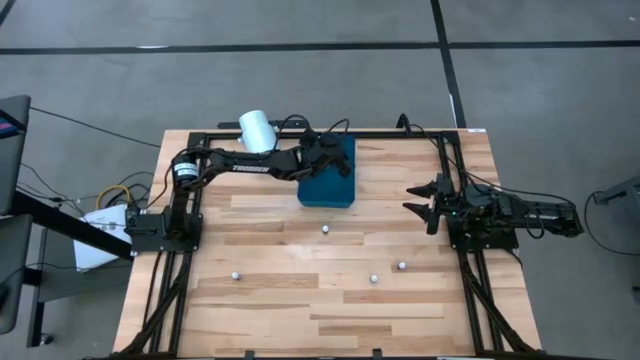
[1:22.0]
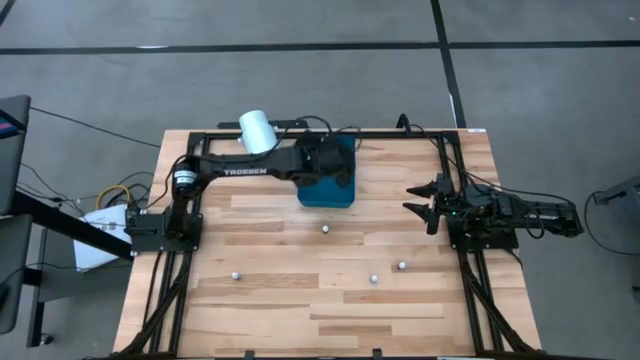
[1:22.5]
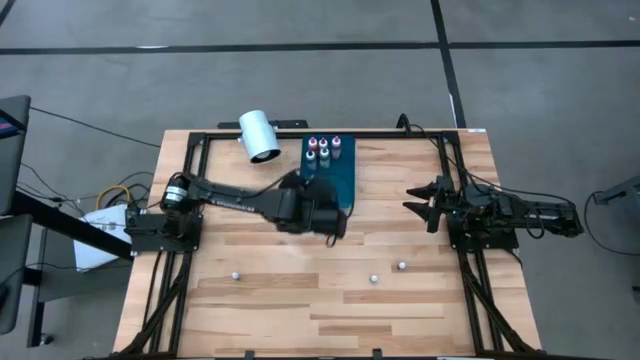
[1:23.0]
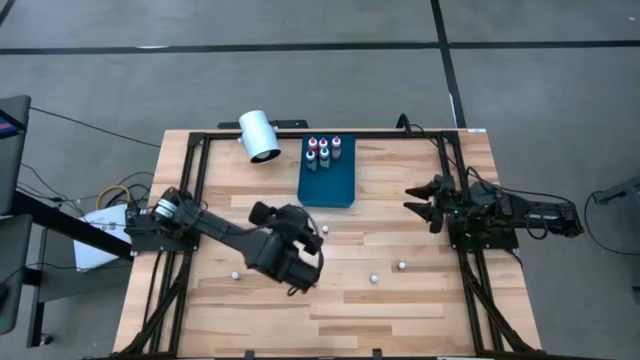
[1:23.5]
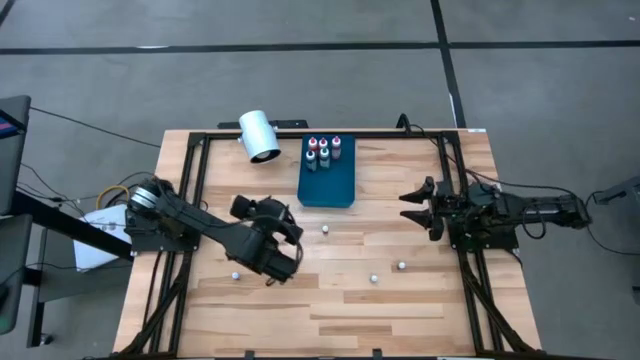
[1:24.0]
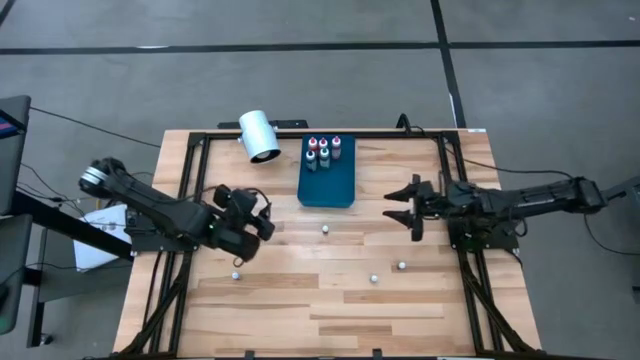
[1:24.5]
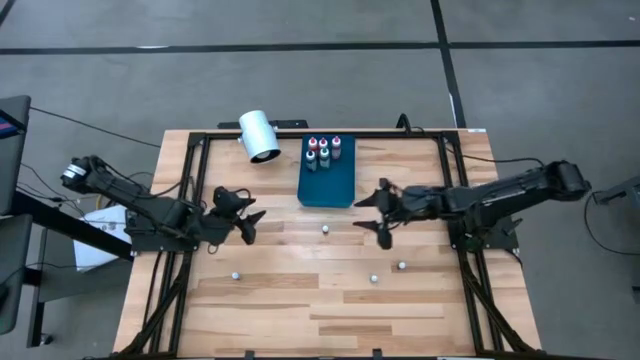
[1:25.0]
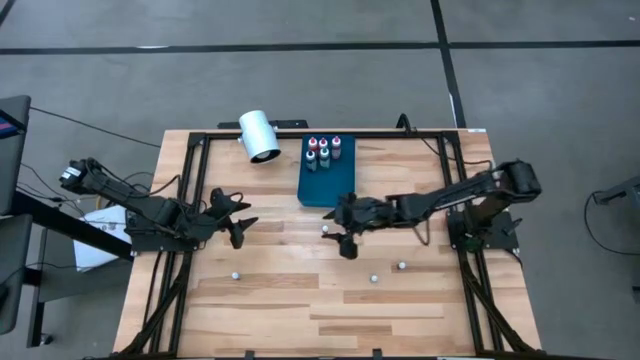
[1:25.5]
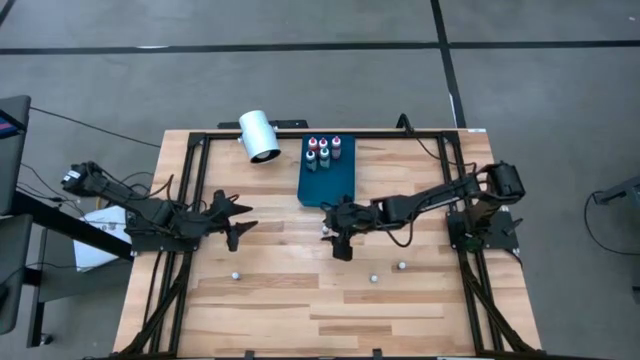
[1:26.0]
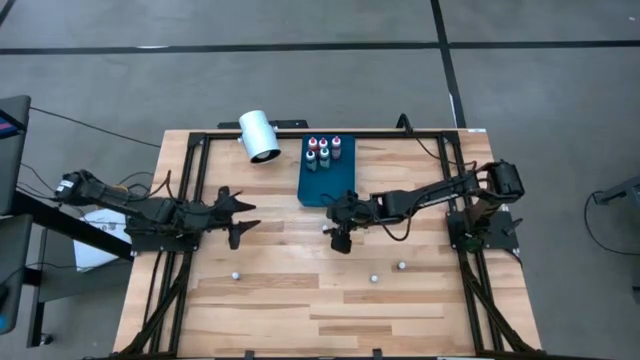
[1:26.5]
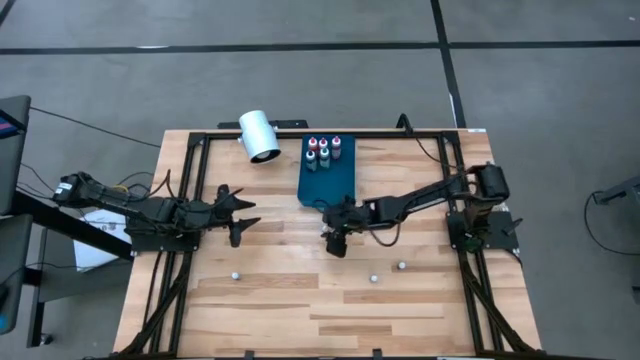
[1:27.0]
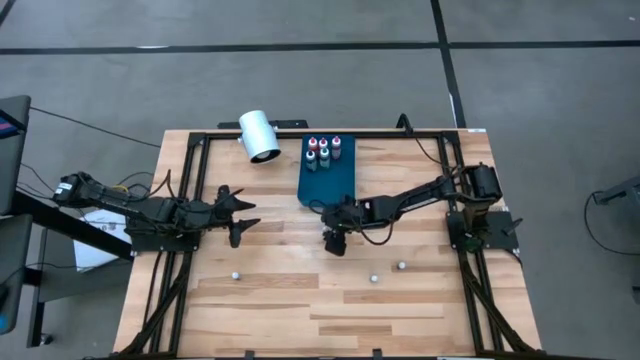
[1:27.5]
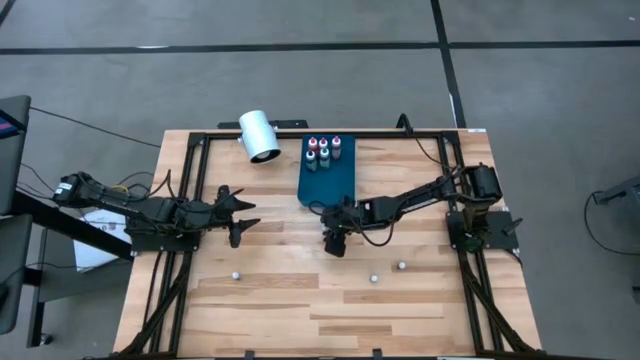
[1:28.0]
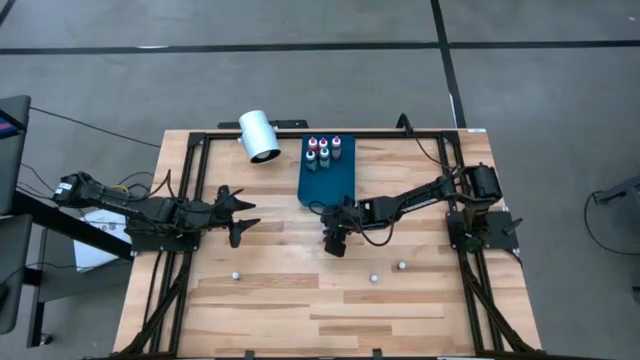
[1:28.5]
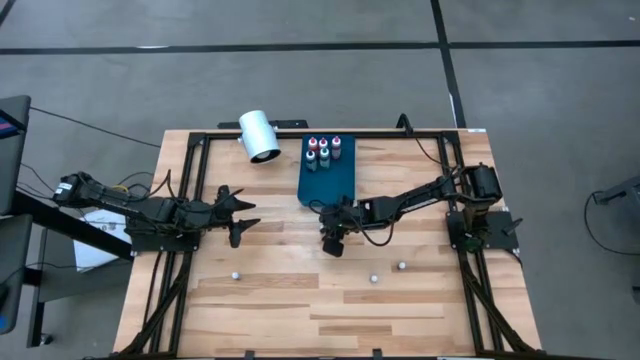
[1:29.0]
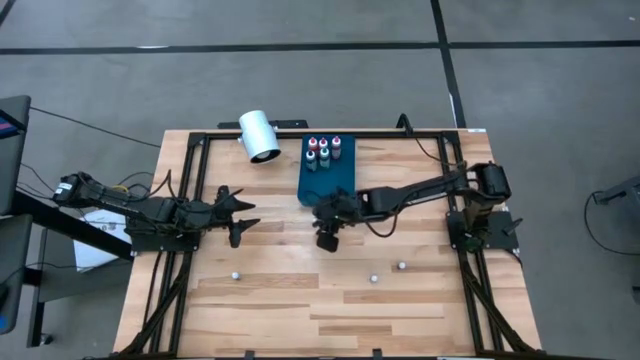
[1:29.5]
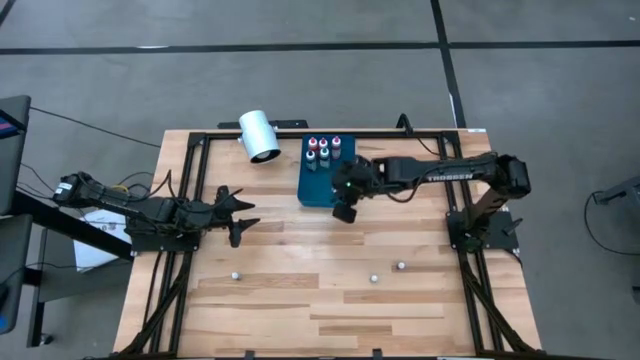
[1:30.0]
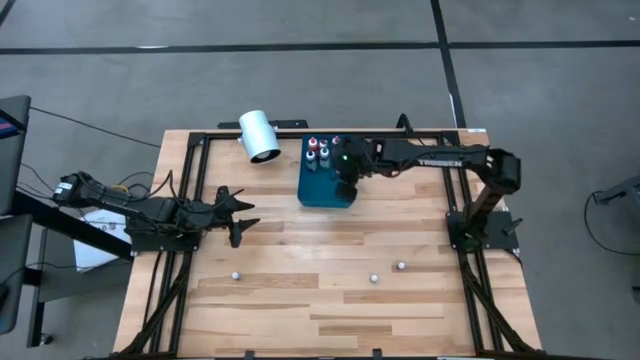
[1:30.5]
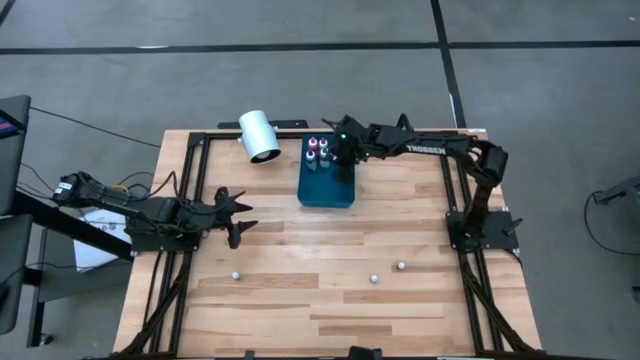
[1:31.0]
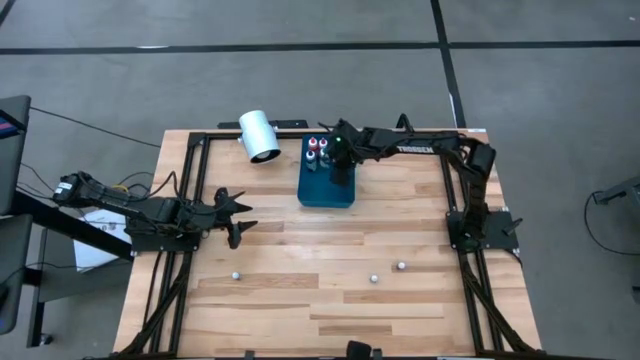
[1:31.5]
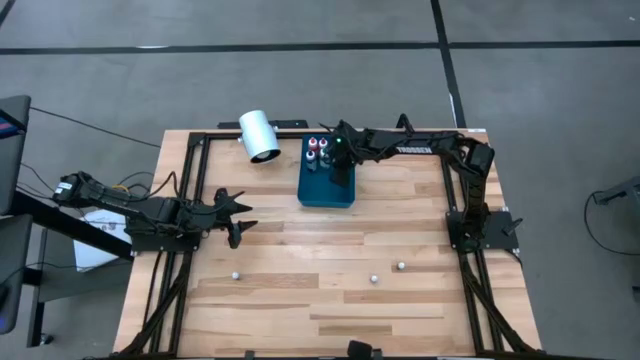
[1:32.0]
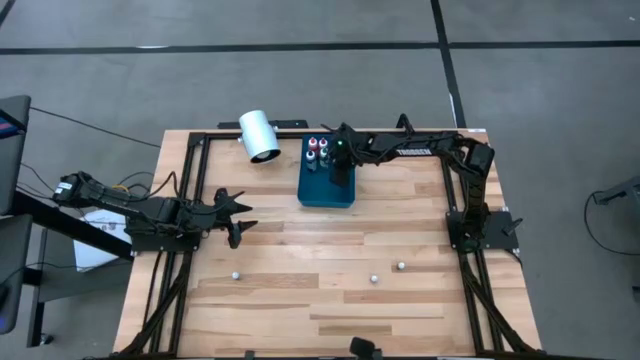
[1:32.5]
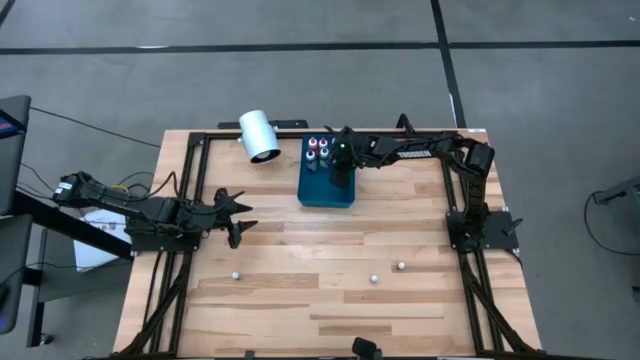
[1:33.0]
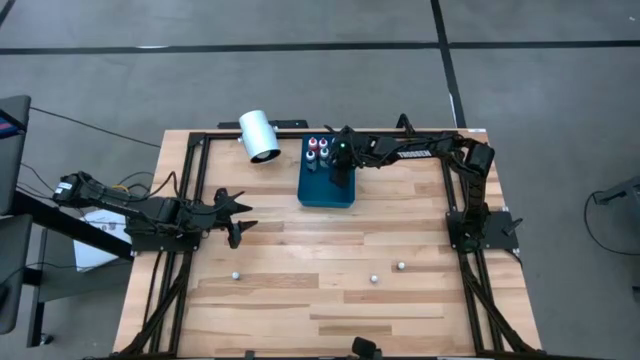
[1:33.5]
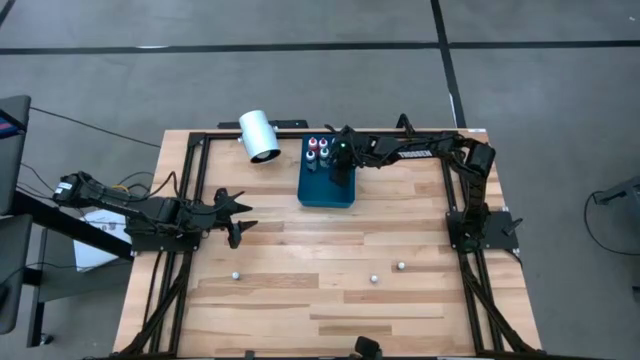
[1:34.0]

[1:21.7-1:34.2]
Task: Pick & Place food coloring
Put the small black food coloring bottle into the blue bin

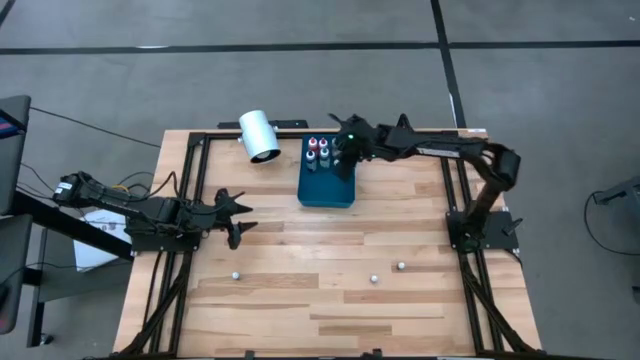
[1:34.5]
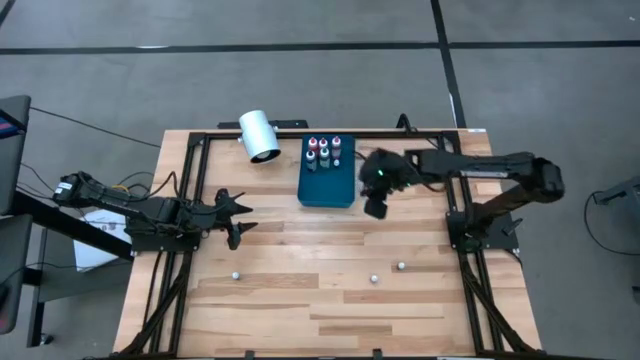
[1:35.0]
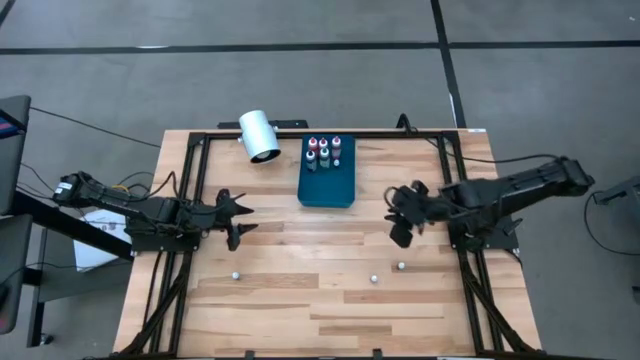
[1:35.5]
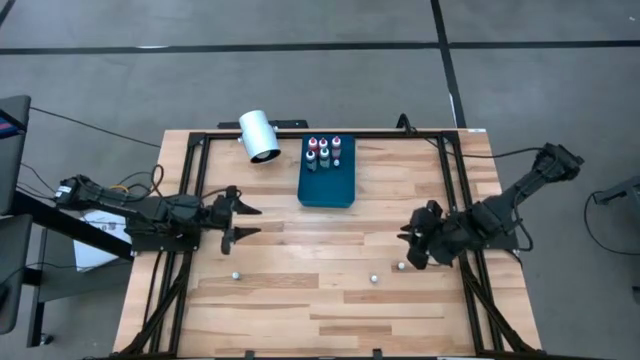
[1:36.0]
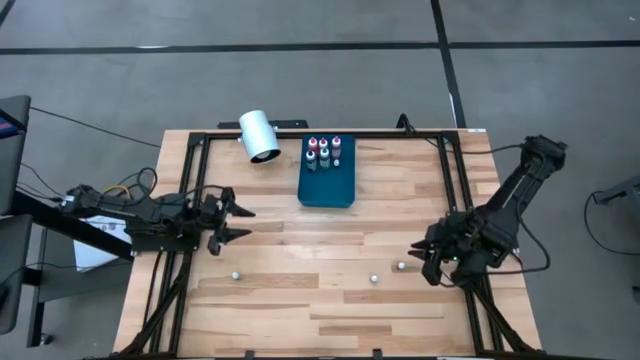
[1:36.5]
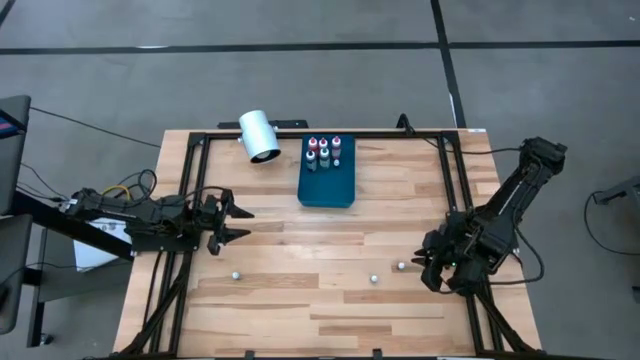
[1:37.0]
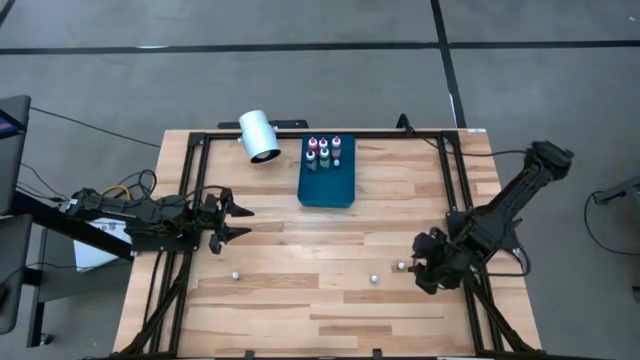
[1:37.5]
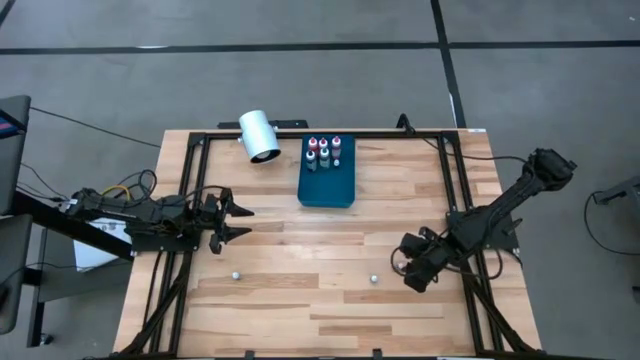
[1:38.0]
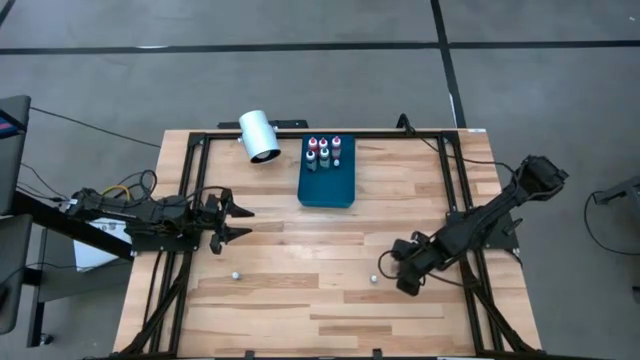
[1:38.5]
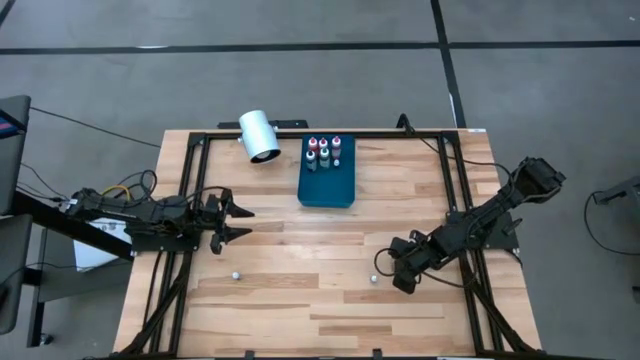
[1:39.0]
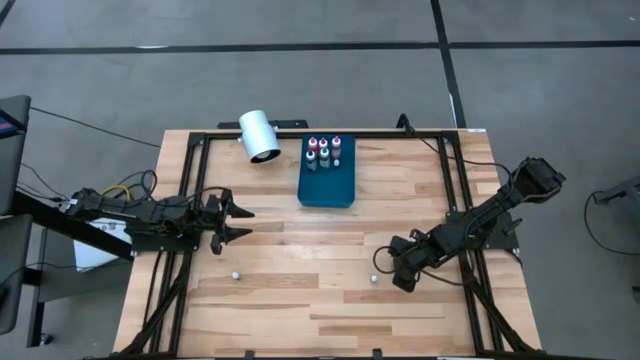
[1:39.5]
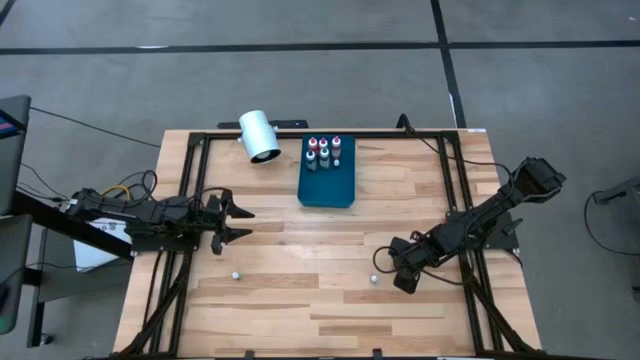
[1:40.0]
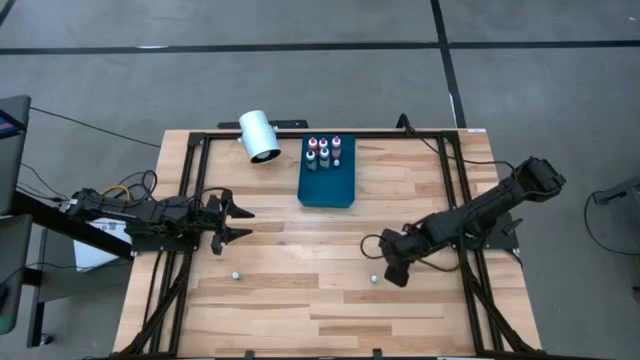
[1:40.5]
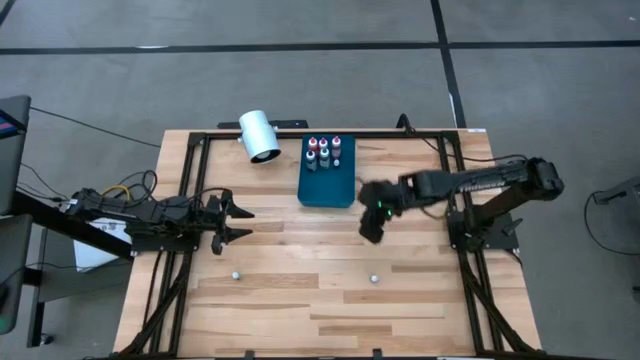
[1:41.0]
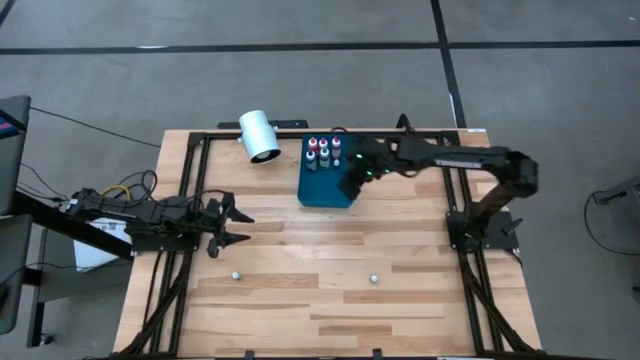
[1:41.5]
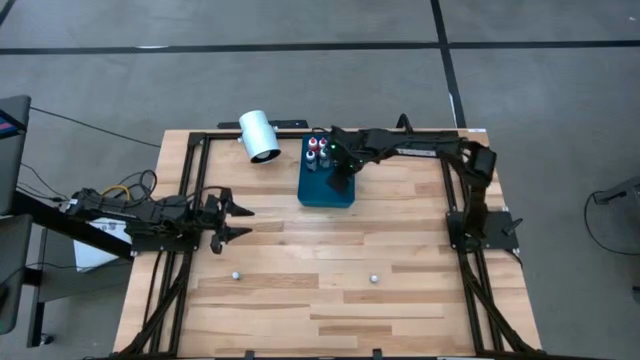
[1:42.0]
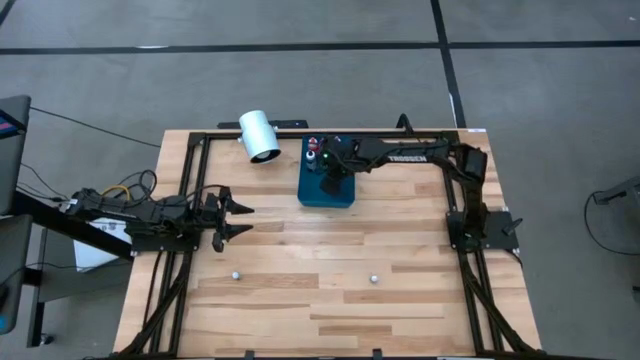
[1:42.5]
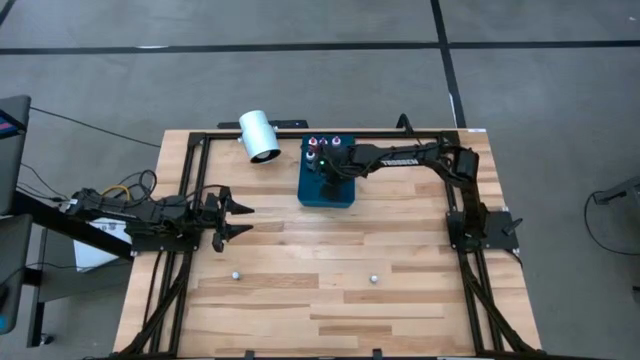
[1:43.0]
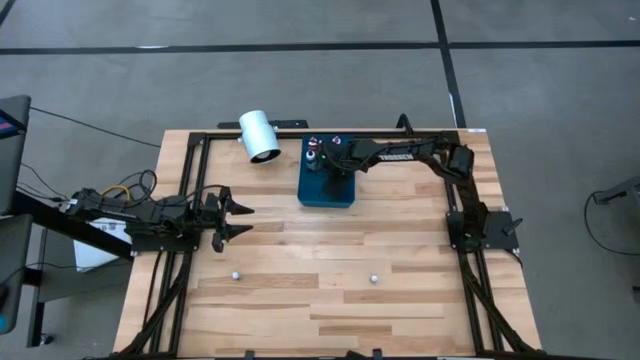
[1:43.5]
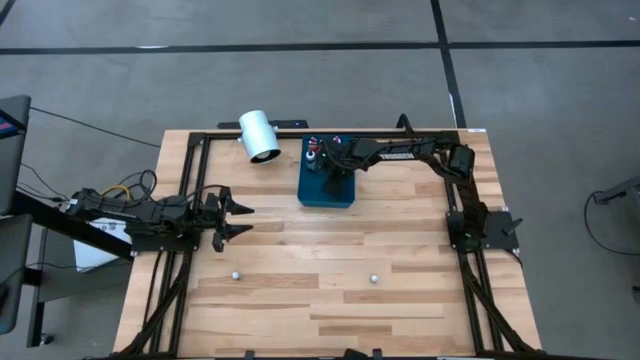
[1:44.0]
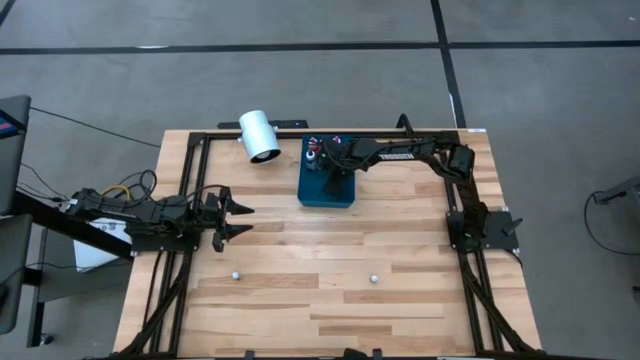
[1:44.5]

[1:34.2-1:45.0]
Put the small violet food coloring bottle into the blue bin
